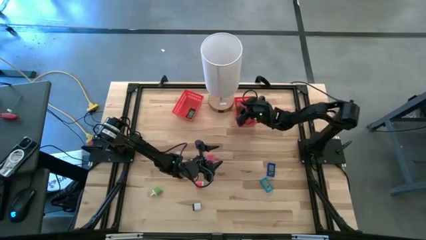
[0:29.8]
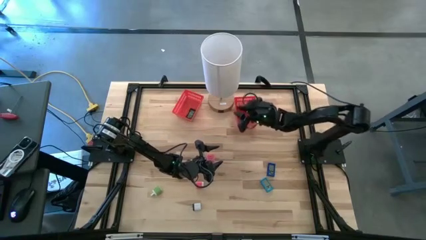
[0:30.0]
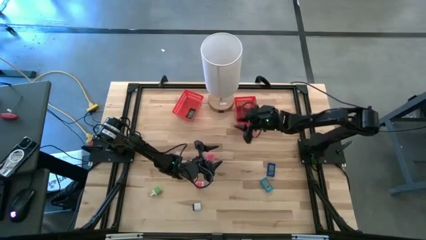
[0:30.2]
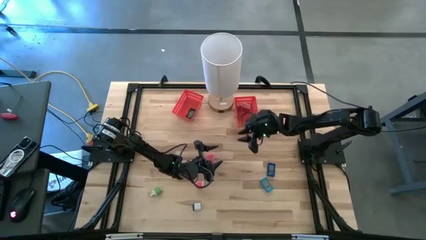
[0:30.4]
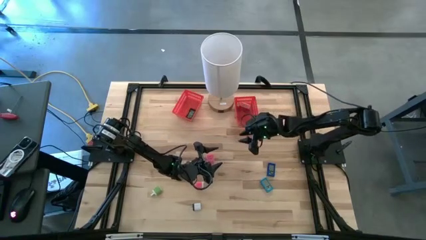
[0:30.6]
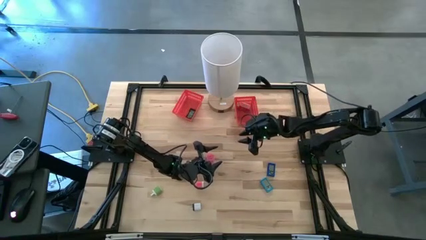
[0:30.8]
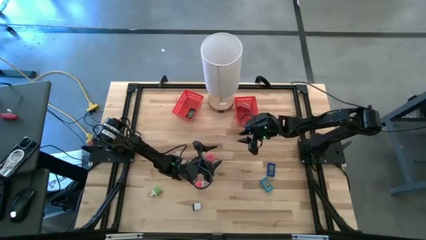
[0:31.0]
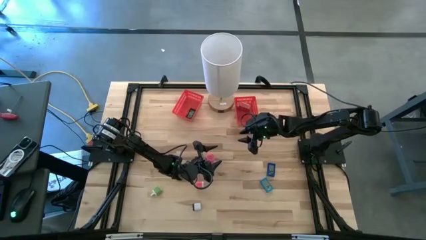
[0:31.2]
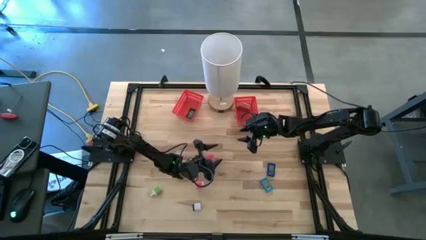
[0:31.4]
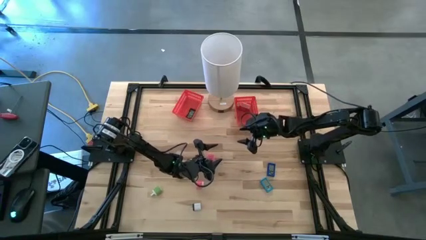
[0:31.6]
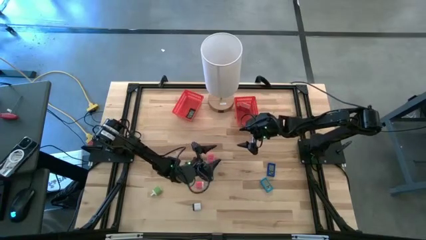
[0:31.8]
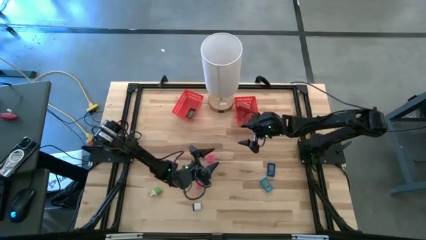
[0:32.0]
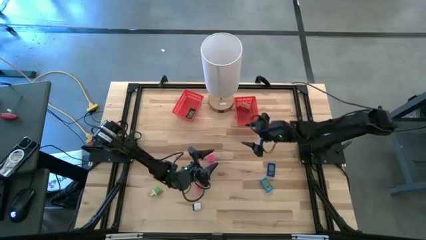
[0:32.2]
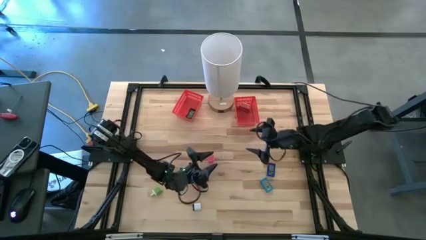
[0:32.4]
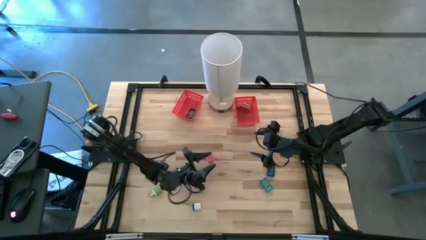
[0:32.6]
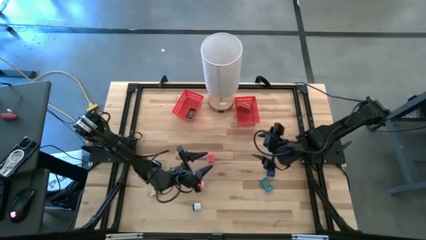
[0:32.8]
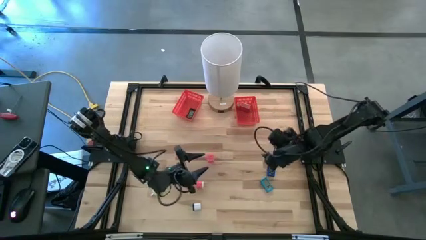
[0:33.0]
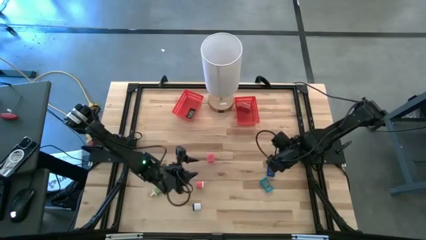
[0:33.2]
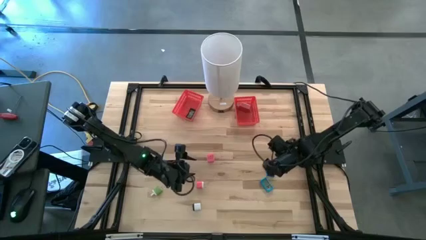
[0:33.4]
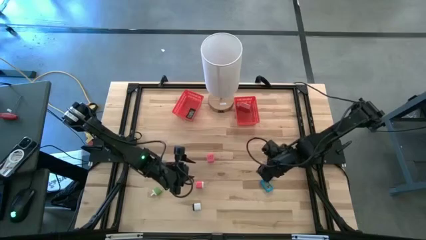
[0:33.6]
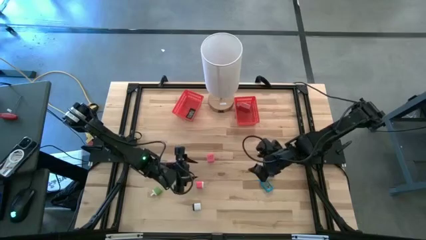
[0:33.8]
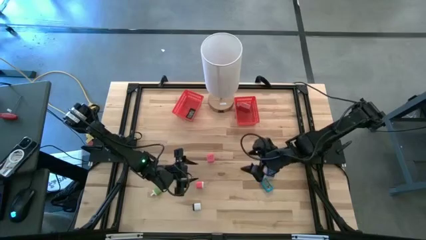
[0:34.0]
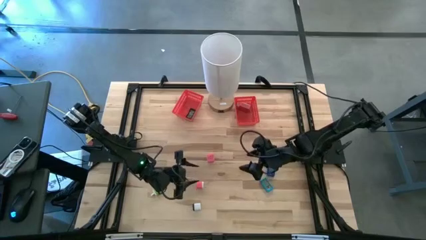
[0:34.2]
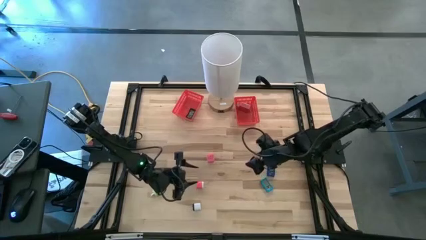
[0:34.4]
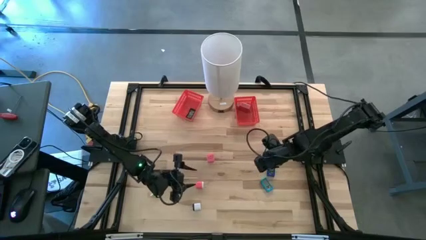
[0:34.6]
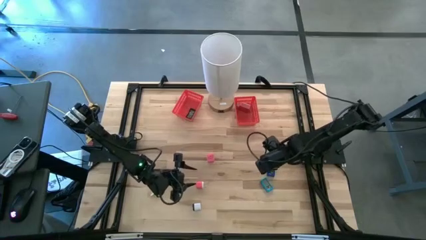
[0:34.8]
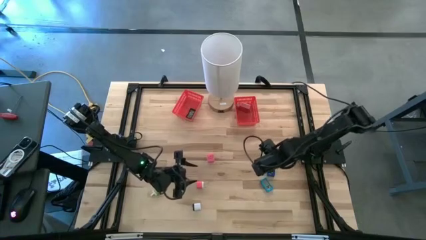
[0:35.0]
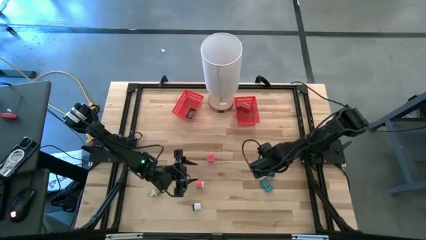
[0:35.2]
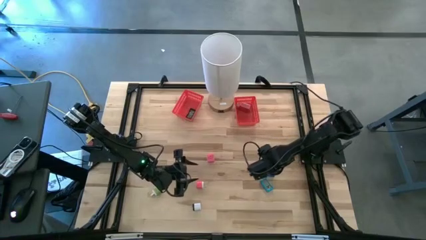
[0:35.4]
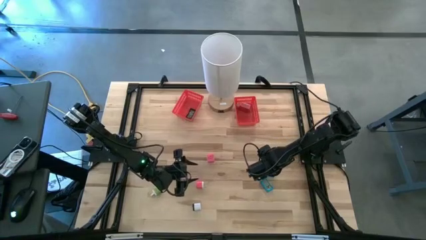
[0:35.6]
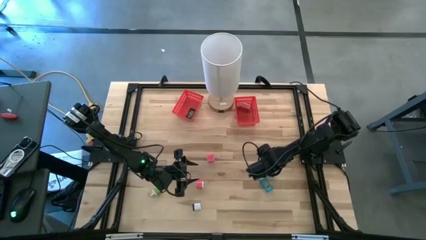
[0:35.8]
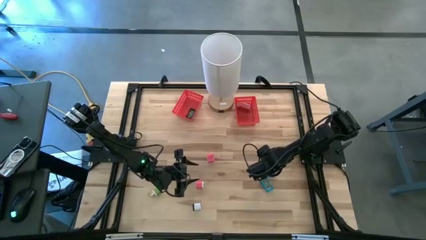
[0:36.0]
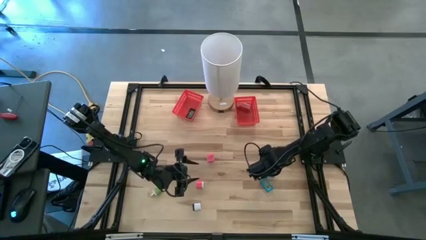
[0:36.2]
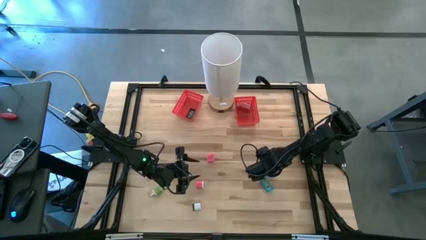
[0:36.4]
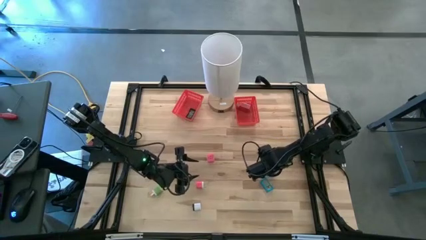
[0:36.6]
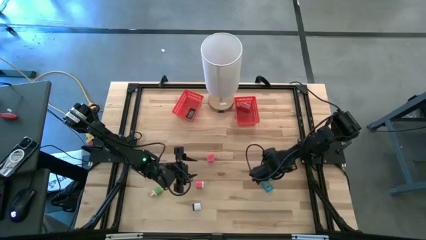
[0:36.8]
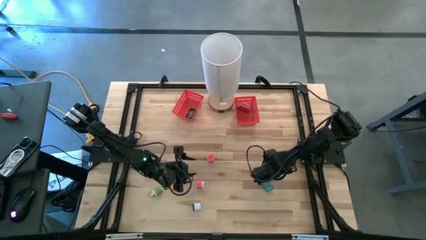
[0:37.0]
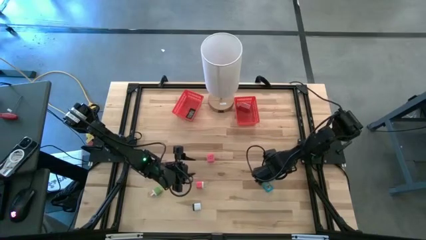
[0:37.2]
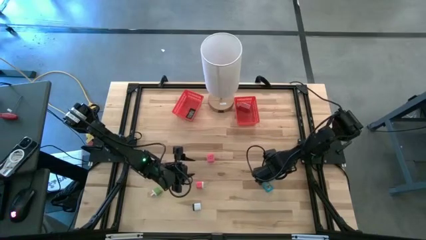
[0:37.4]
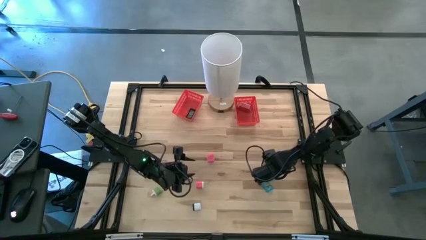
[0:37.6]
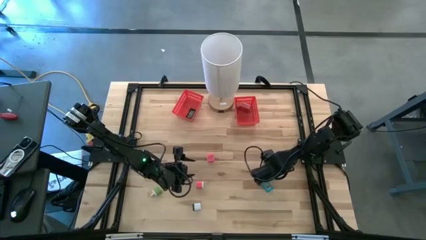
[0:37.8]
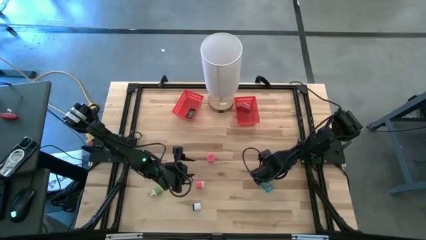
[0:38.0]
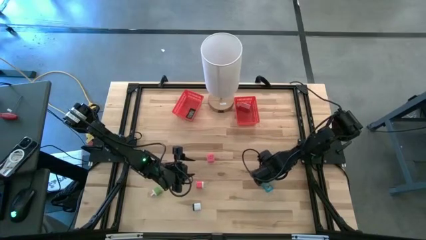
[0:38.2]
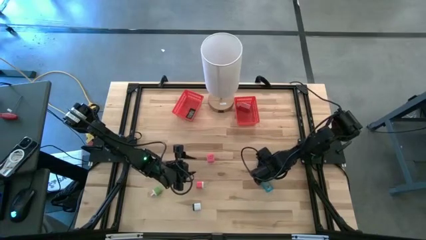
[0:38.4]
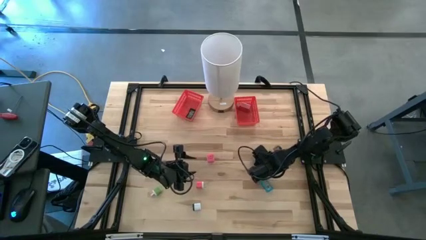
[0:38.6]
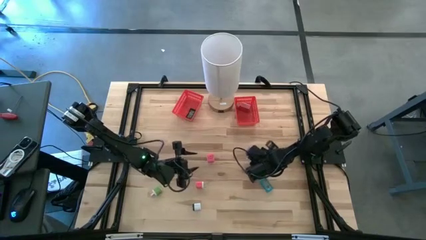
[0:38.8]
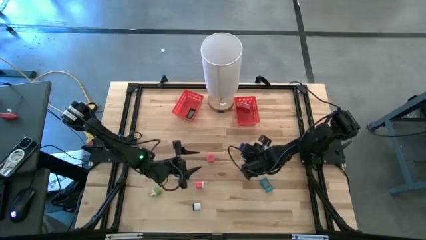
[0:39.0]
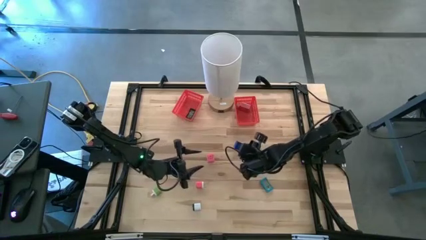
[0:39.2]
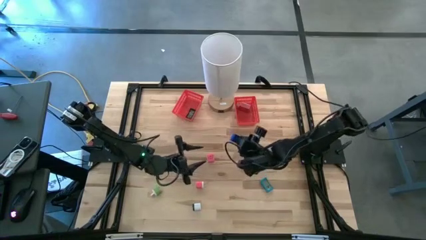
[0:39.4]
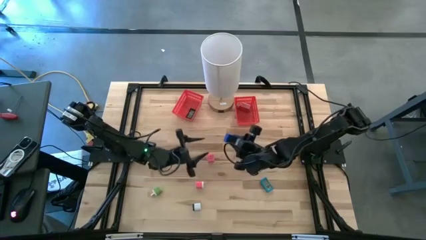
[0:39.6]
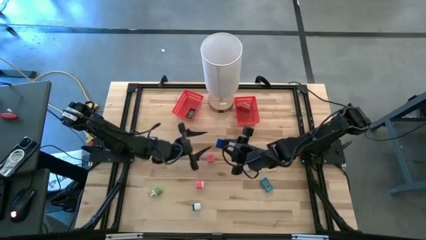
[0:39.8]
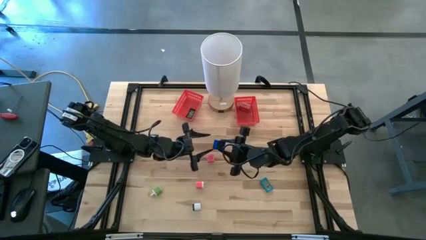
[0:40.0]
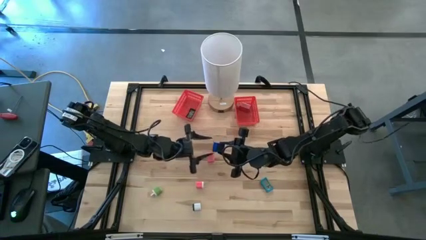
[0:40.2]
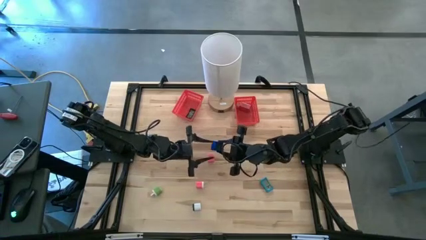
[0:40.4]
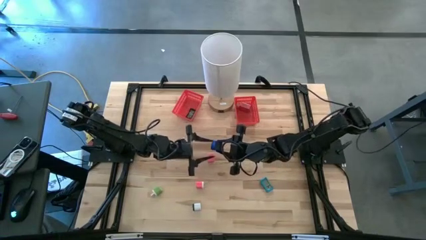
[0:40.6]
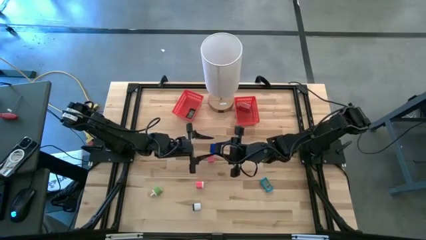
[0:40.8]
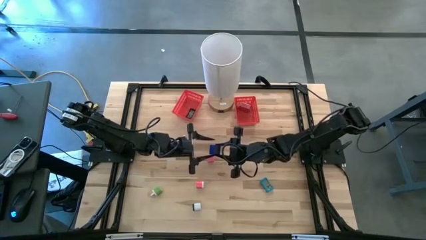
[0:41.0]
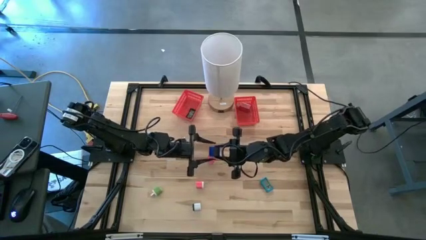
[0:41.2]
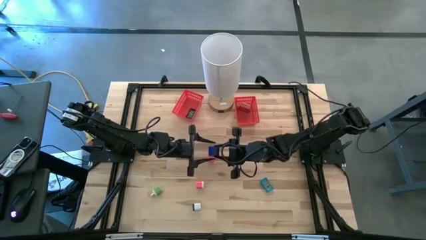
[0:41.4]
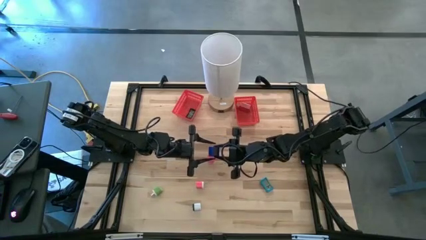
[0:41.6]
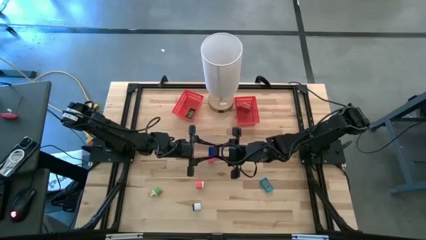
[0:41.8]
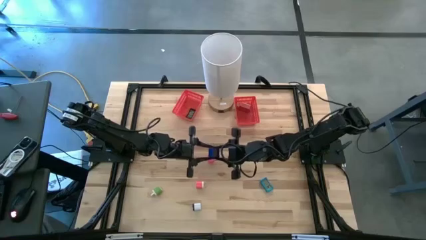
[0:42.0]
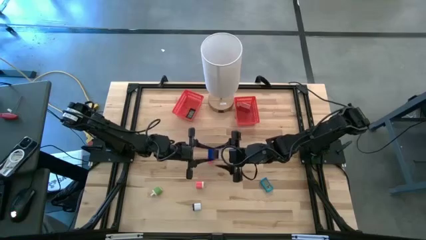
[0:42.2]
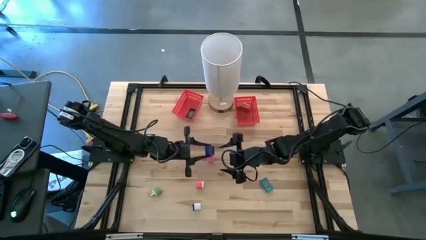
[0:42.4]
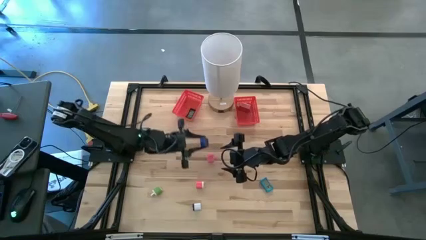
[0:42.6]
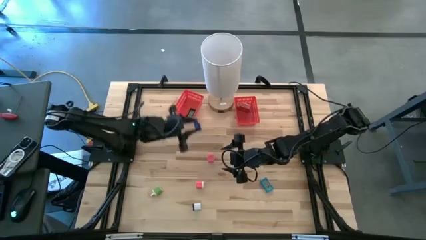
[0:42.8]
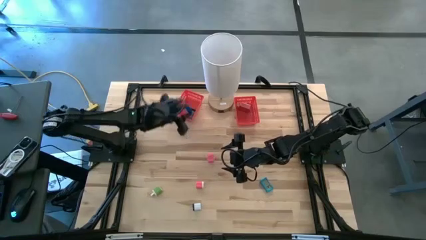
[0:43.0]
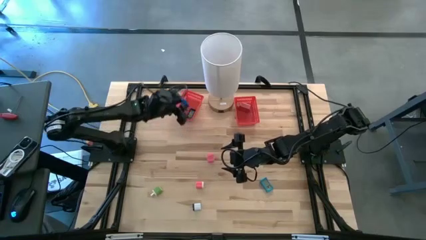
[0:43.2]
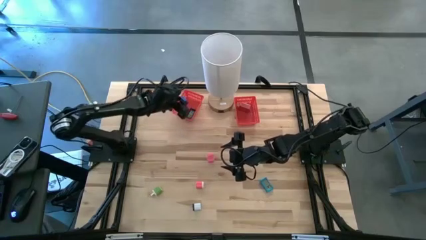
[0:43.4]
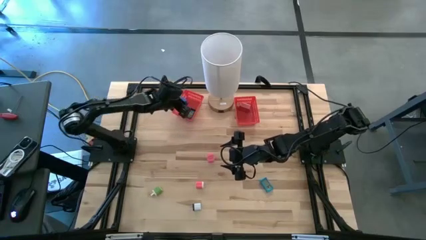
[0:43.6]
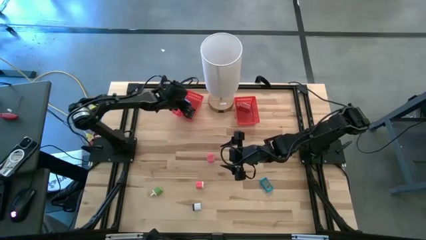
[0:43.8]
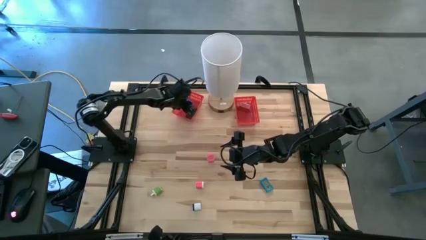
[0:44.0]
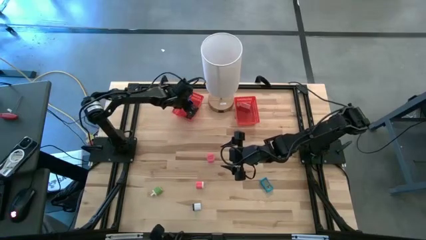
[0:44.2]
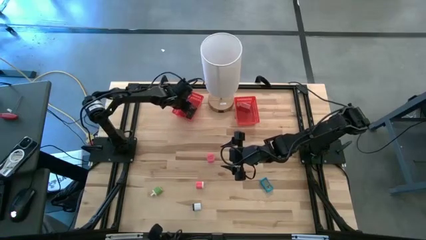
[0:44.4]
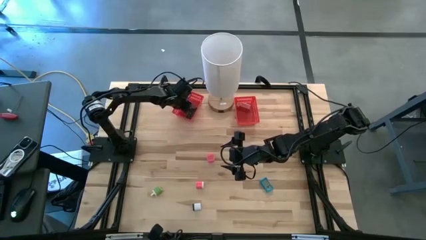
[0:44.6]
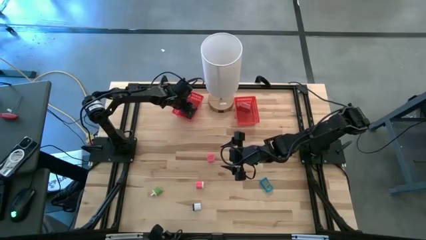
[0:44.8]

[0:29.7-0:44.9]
Task: Sort adapters and digital timers
Put the dark blue digital timer into the left red bin
